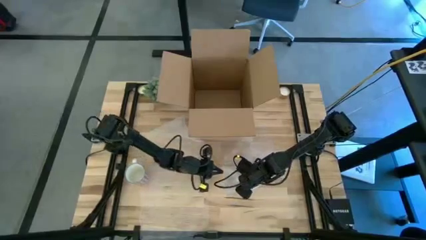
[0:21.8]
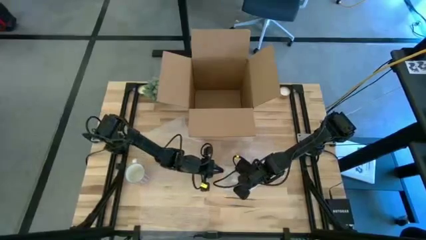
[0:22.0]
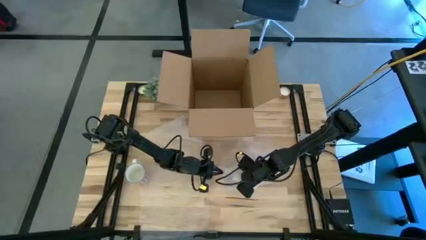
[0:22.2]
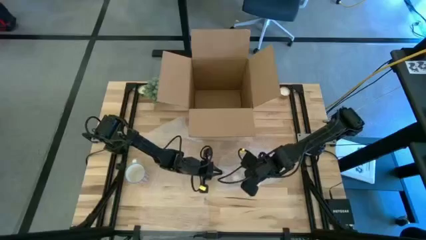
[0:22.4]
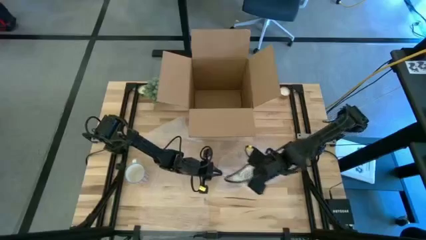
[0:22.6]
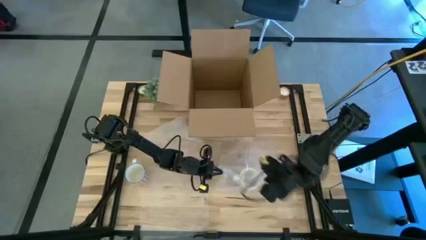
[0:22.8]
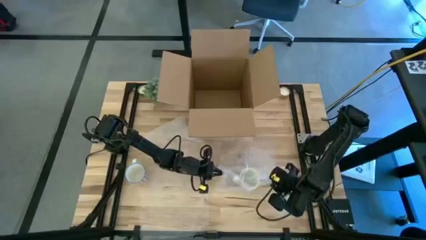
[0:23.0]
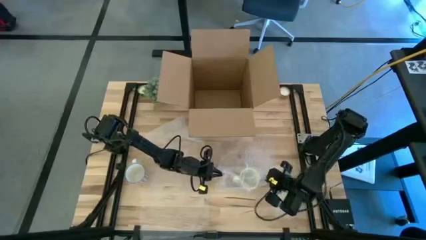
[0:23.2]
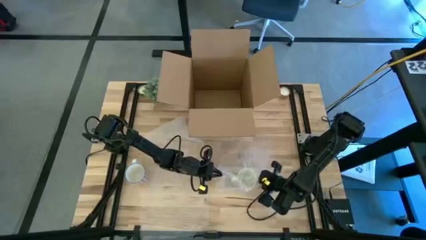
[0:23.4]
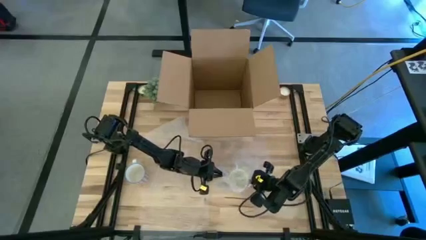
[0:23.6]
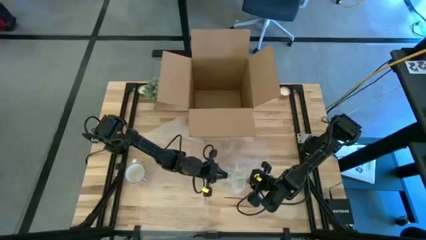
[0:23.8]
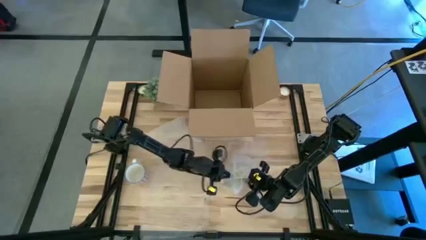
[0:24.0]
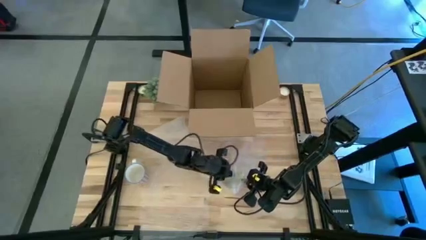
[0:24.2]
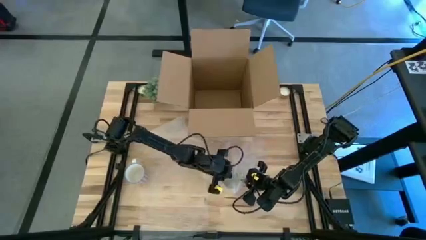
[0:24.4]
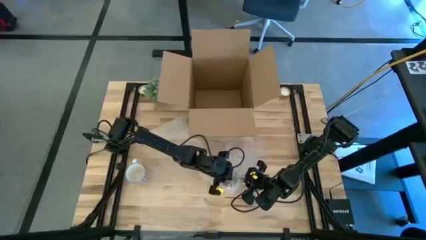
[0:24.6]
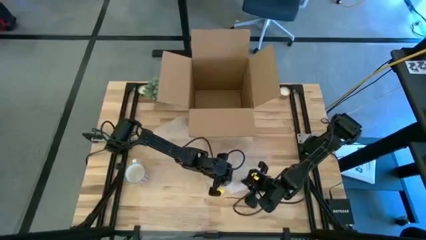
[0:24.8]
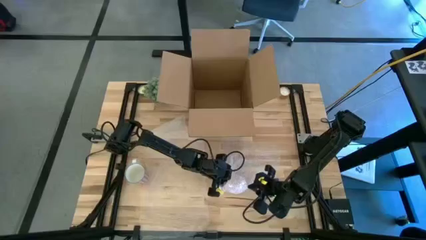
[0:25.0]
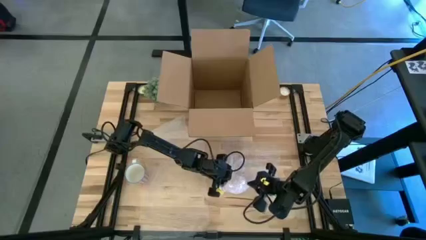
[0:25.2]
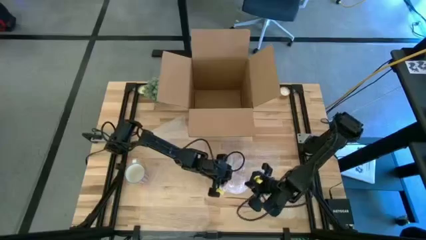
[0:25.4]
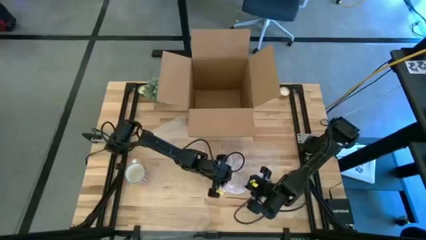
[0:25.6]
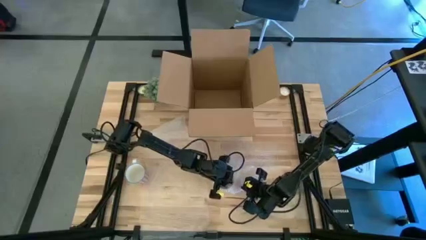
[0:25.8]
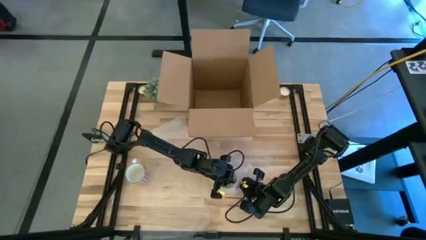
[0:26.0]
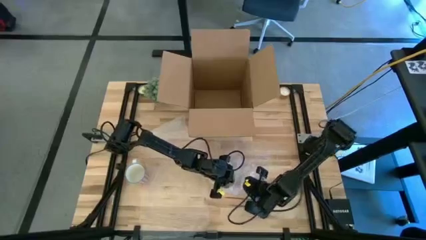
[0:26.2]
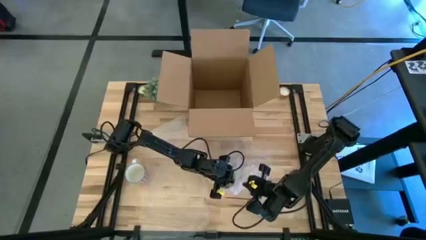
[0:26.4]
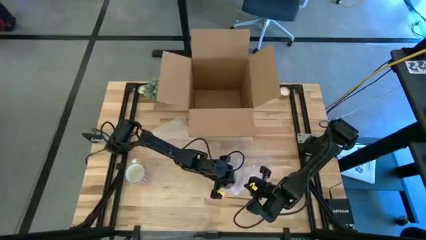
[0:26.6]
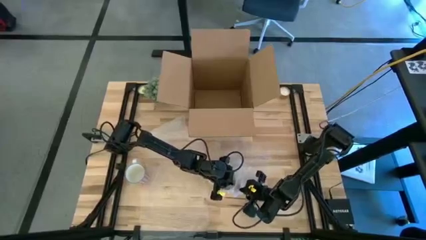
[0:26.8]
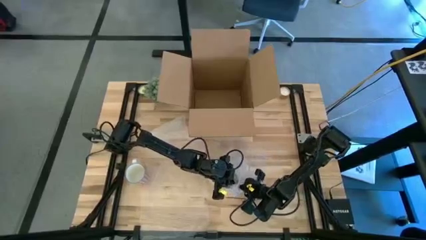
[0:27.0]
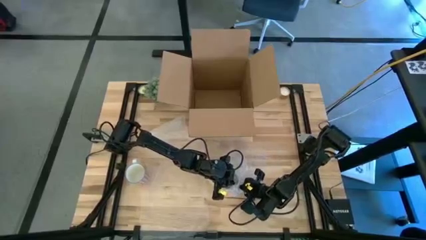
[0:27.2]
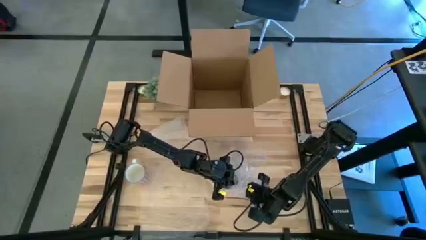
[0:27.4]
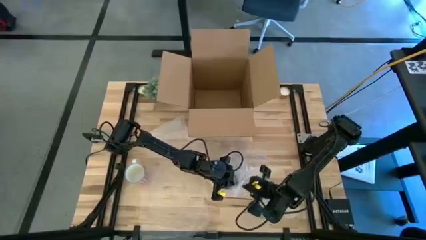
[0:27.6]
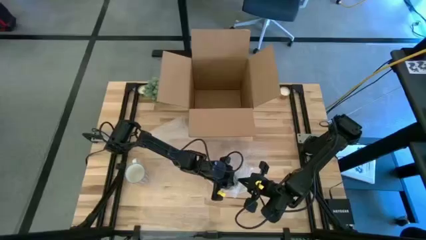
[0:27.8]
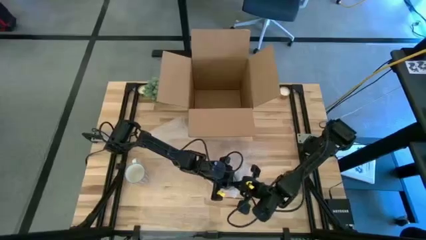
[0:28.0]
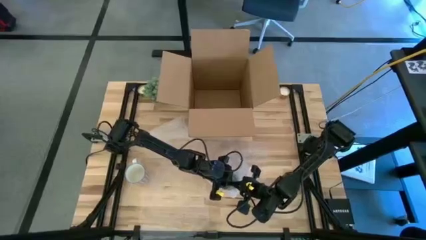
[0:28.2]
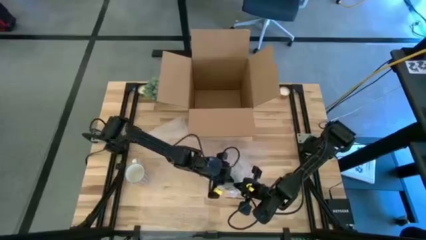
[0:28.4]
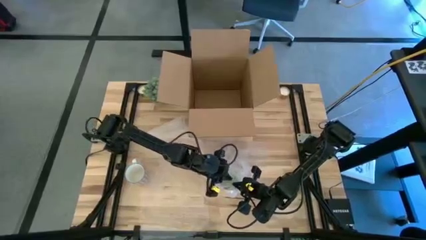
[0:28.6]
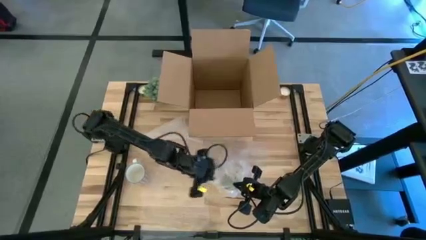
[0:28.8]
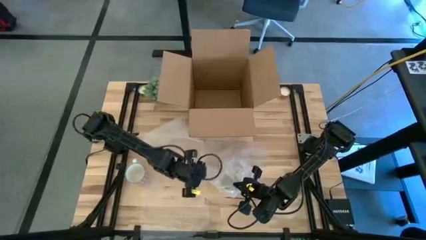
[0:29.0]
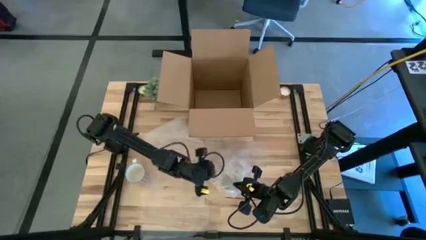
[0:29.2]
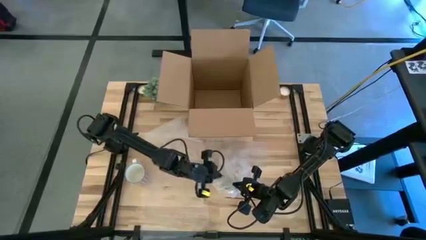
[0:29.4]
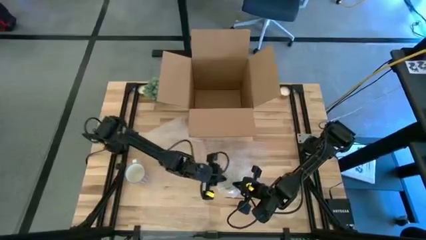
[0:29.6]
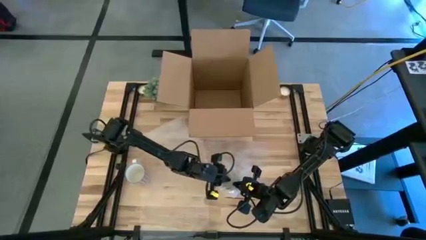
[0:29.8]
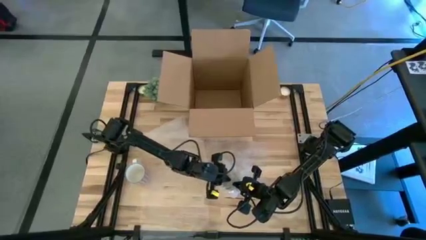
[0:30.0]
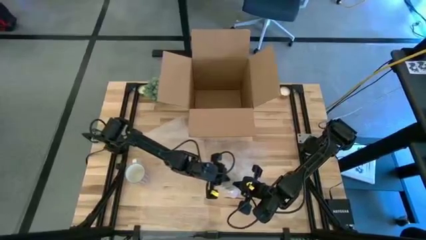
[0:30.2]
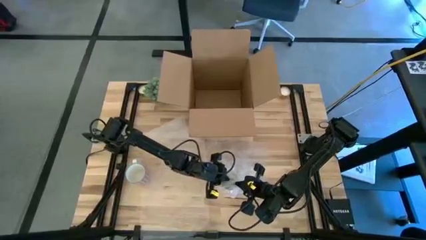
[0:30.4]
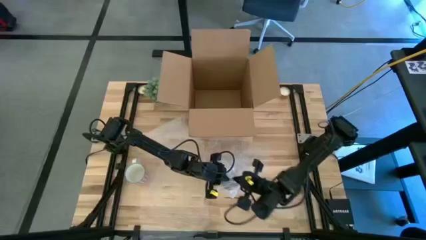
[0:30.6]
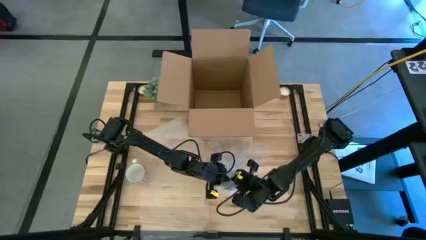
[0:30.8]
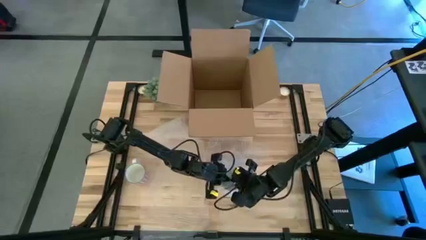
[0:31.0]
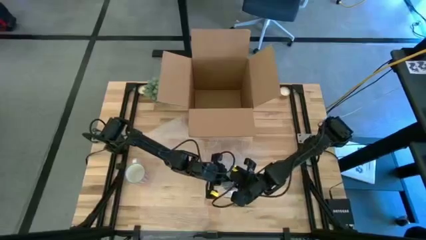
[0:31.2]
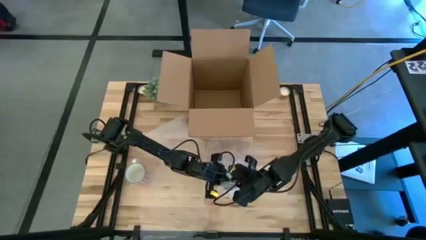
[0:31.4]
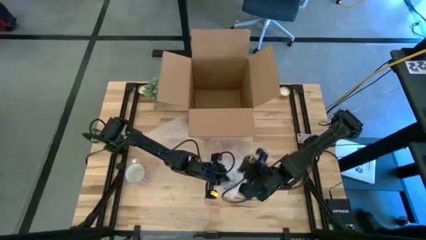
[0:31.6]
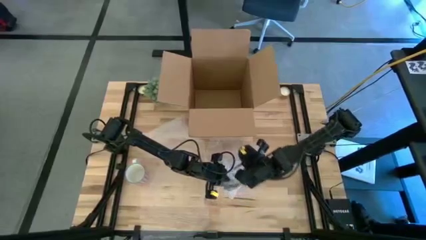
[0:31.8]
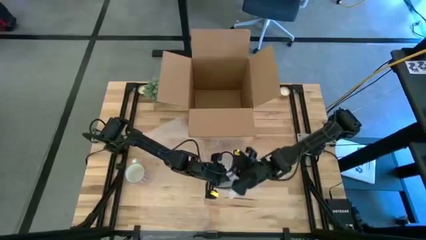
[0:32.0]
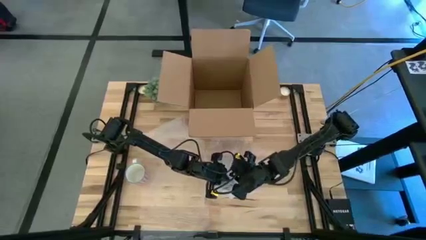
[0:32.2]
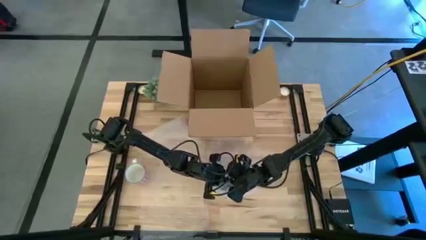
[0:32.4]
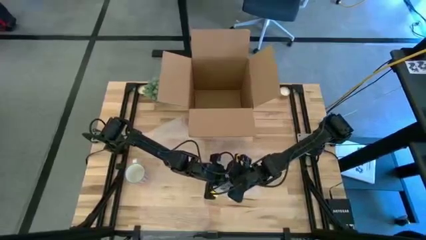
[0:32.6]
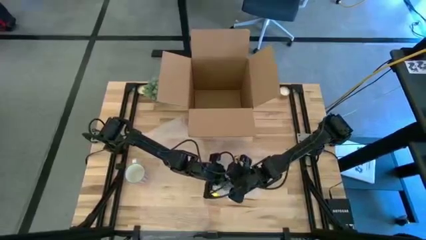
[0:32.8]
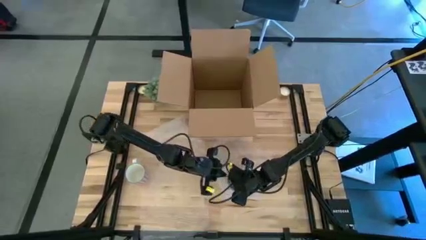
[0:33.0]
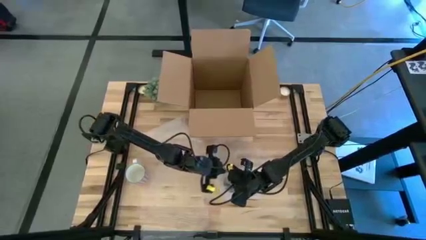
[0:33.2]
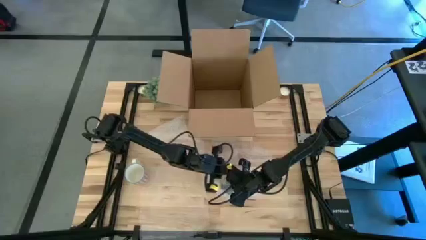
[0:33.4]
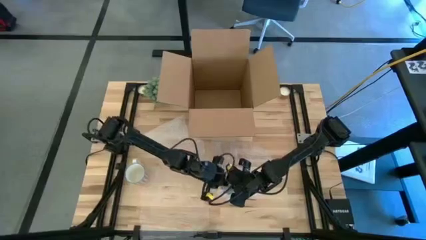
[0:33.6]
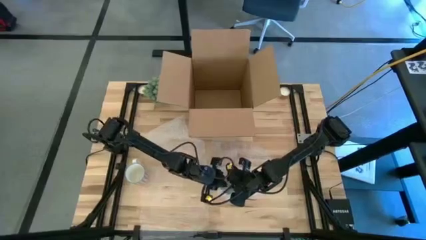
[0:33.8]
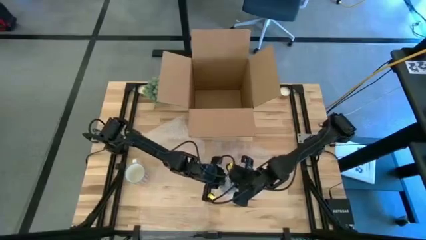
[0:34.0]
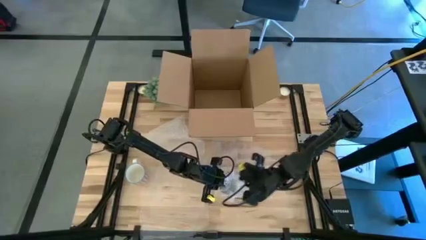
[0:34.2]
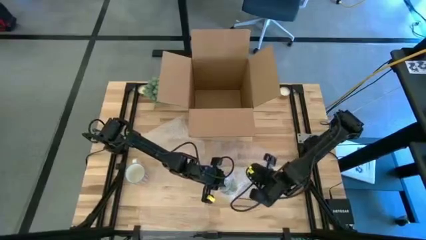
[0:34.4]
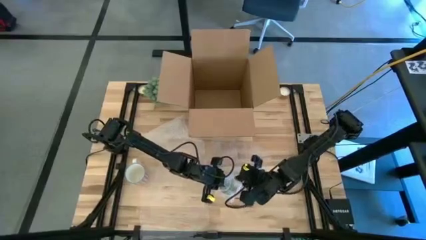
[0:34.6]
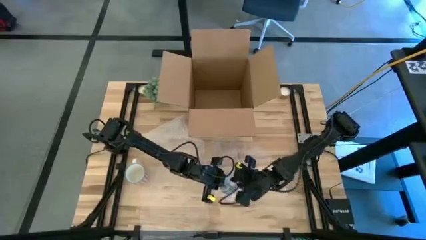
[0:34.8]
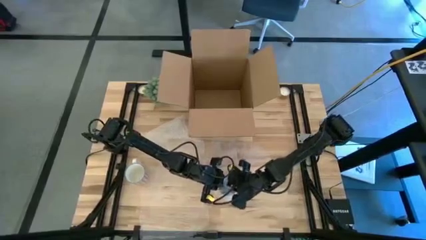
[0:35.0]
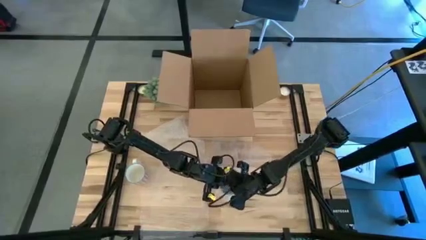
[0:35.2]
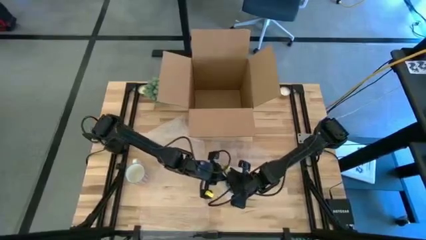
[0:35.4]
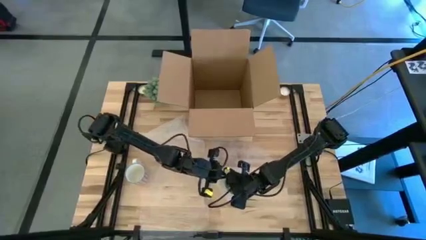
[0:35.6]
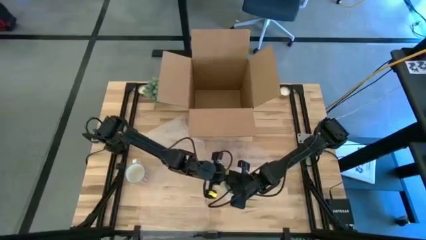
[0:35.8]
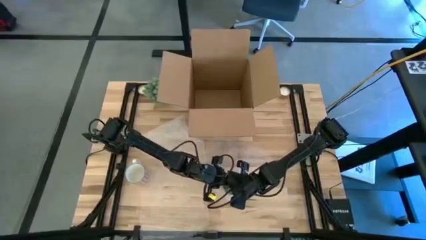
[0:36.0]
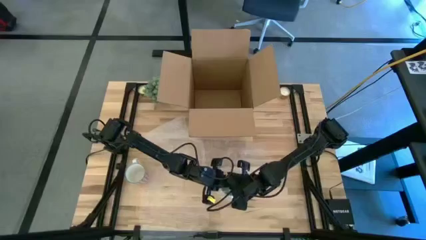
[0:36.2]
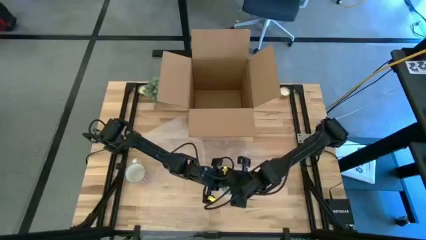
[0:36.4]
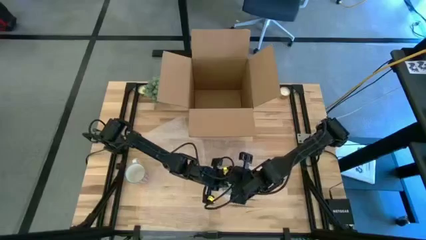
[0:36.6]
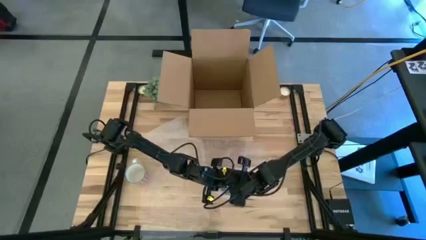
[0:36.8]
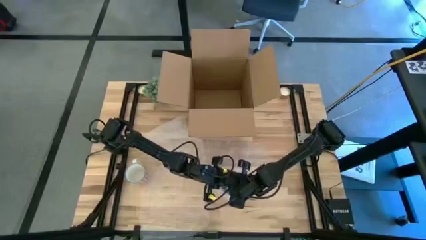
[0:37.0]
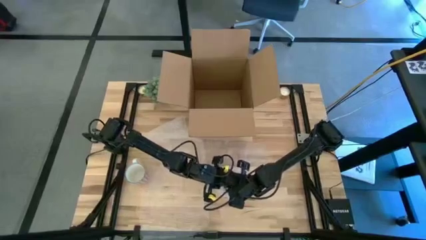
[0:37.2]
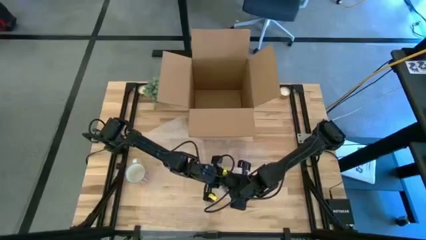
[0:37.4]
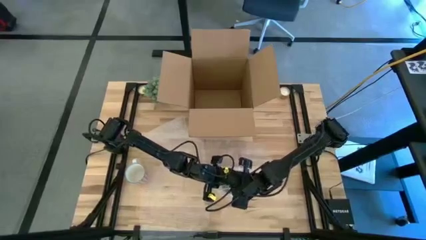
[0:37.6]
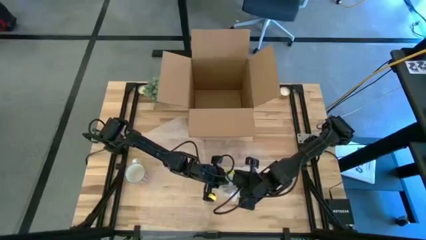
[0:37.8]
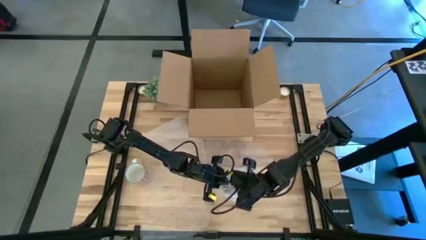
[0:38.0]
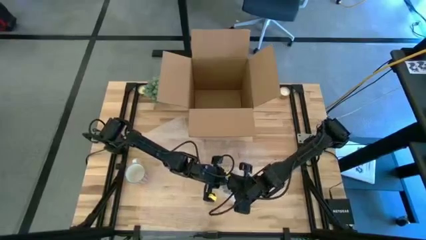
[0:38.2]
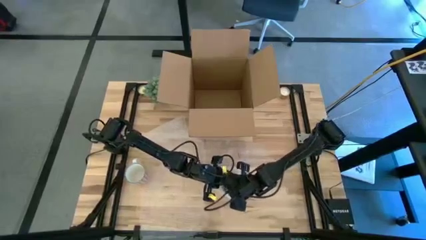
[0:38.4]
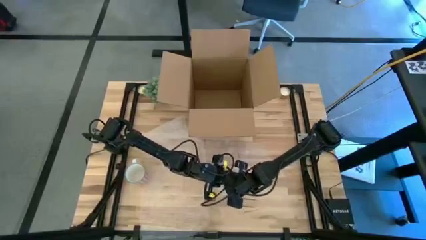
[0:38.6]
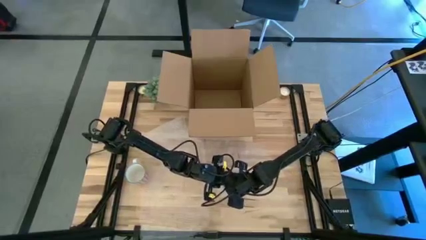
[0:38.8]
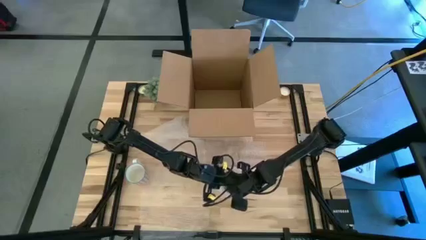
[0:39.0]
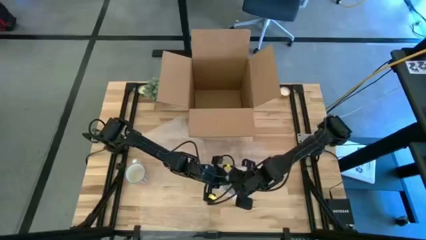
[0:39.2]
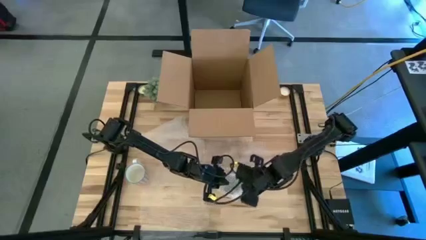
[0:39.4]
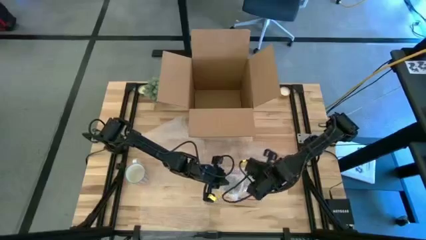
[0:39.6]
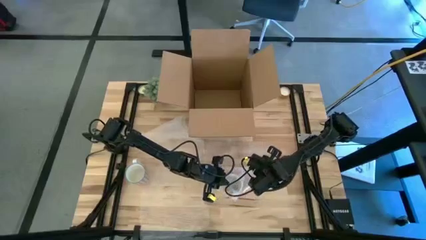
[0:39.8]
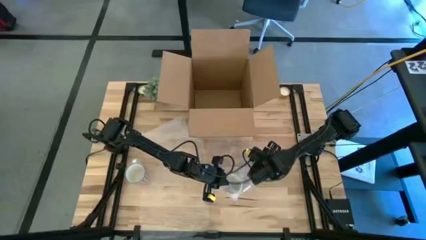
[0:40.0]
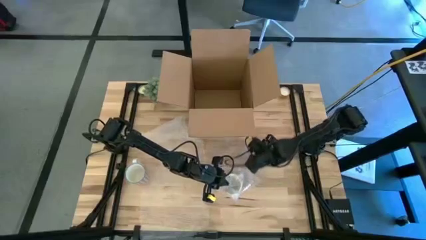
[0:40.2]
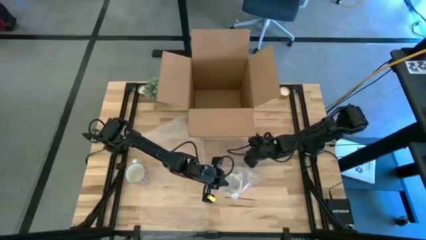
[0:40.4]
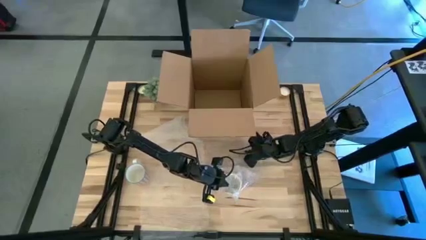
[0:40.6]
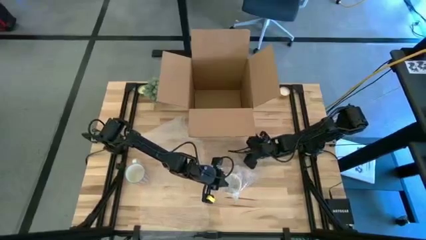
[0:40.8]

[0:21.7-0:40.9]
Task: wrap mug
Wrap the orange mug with the bubble wrap
